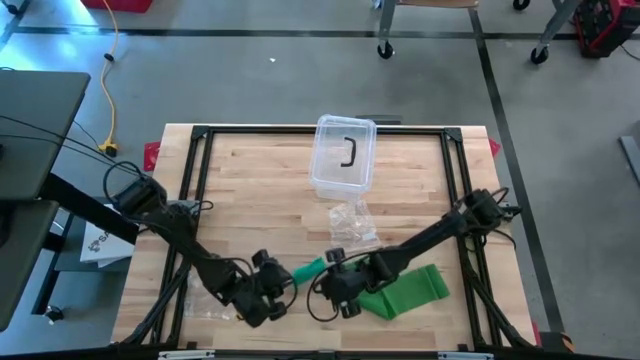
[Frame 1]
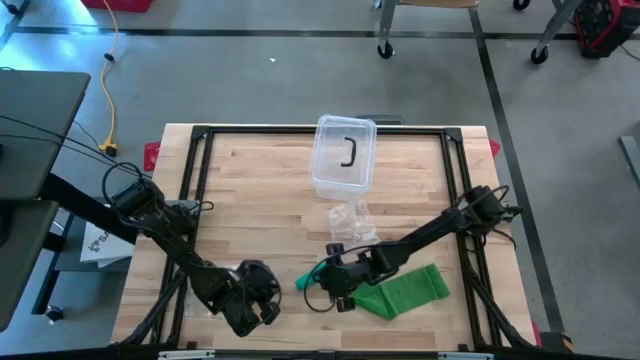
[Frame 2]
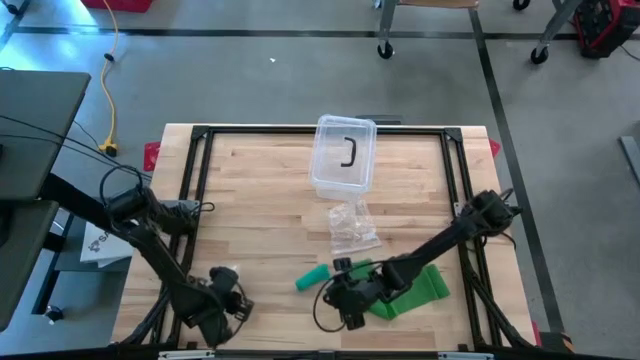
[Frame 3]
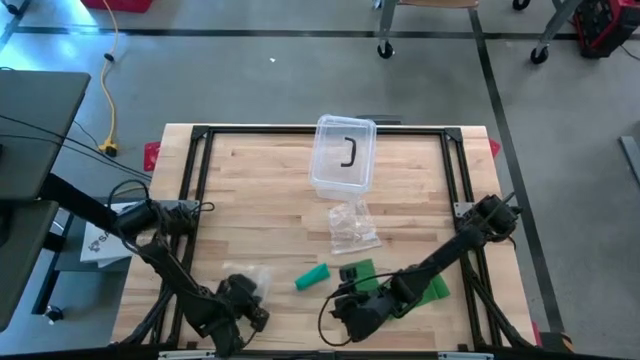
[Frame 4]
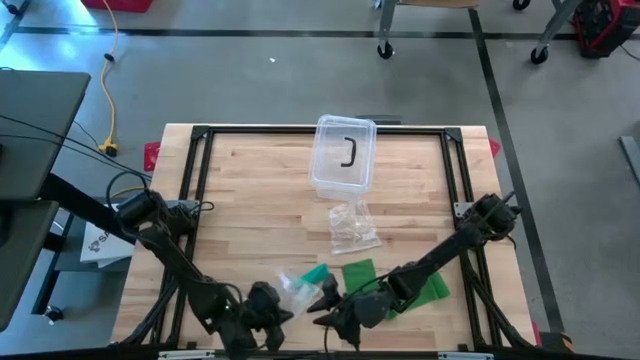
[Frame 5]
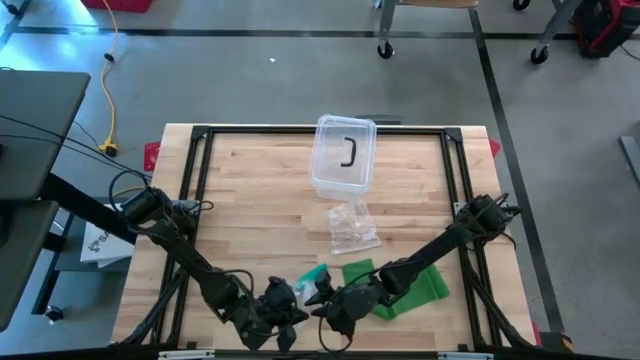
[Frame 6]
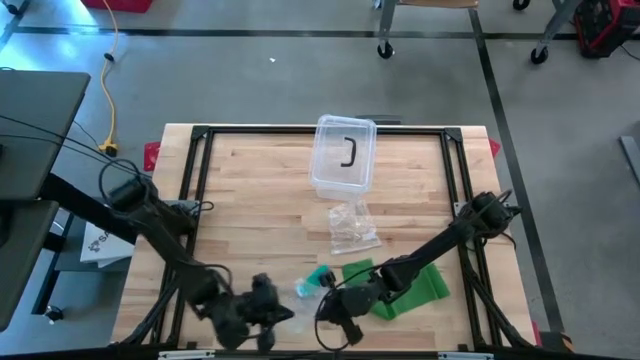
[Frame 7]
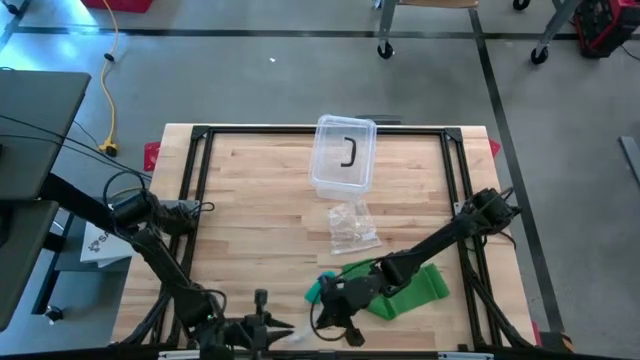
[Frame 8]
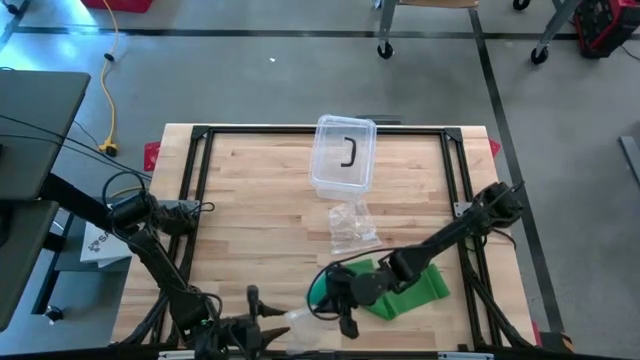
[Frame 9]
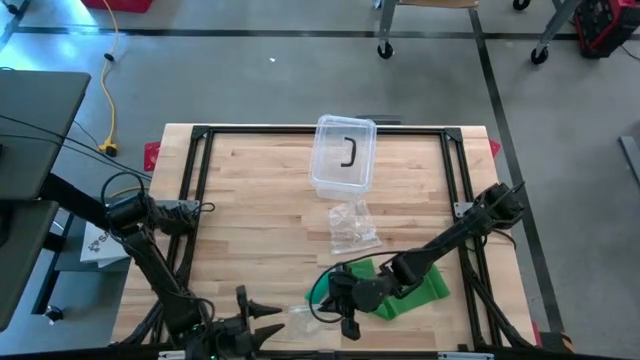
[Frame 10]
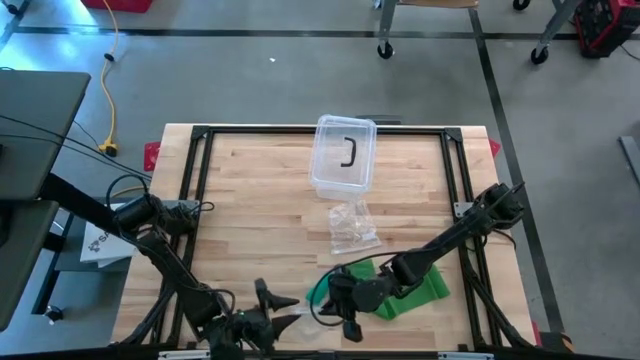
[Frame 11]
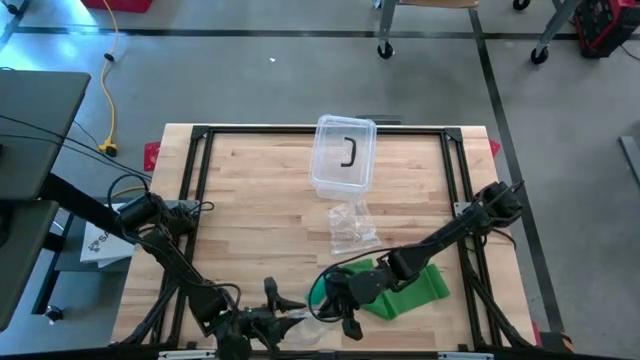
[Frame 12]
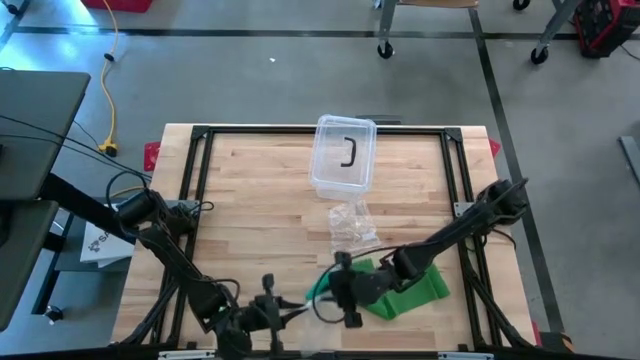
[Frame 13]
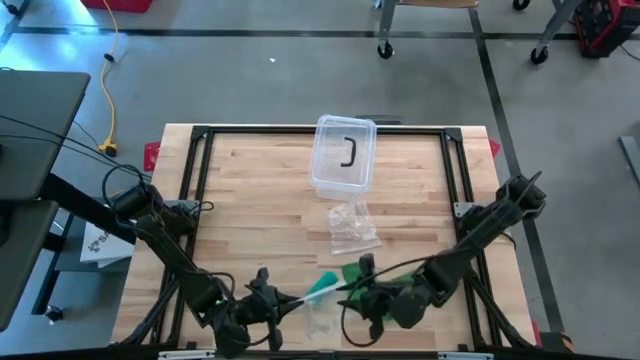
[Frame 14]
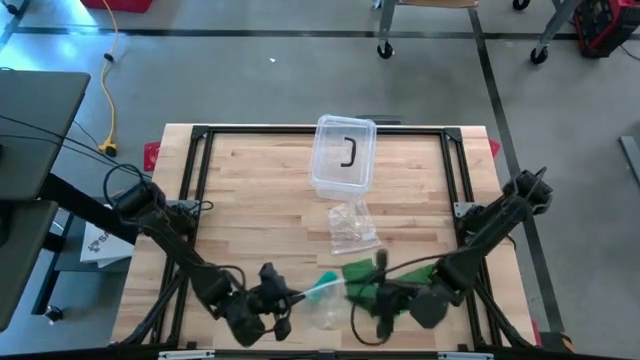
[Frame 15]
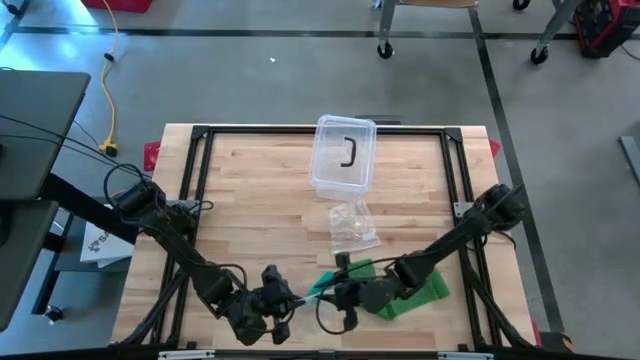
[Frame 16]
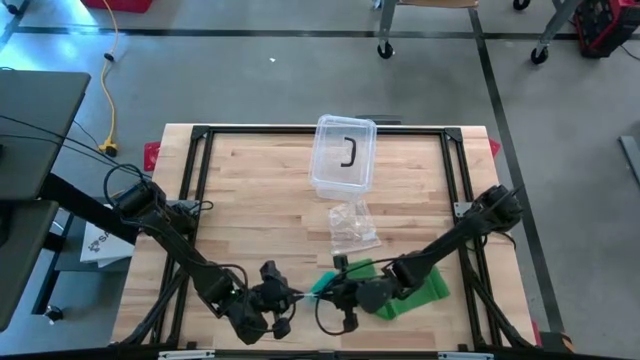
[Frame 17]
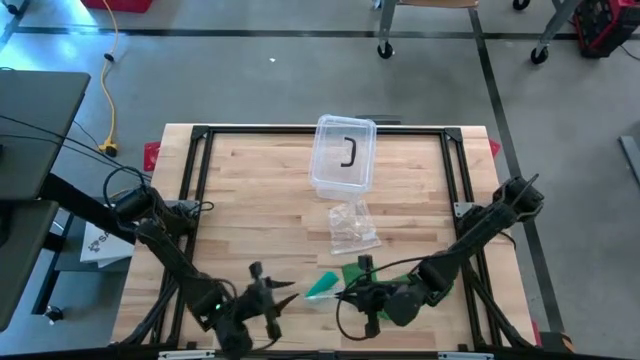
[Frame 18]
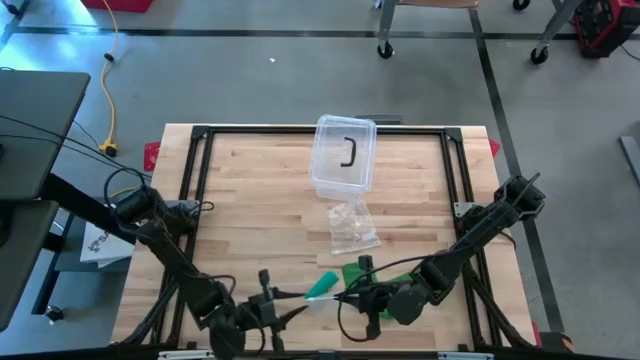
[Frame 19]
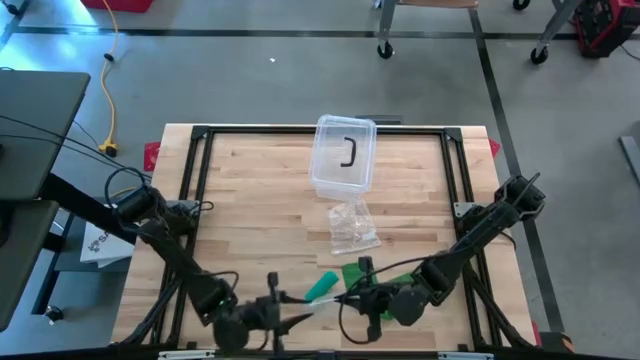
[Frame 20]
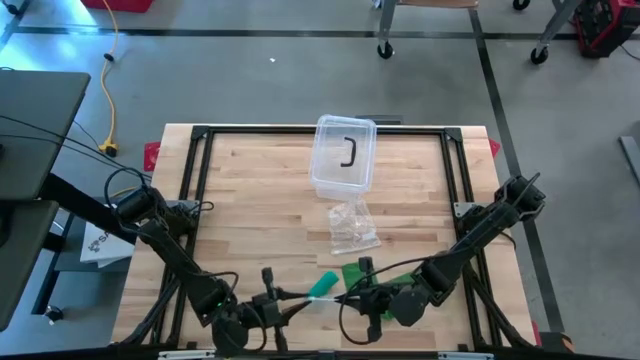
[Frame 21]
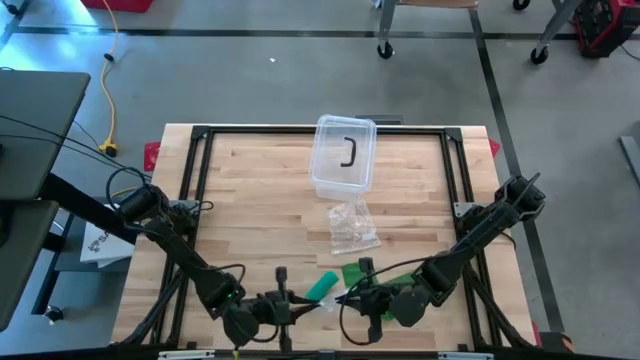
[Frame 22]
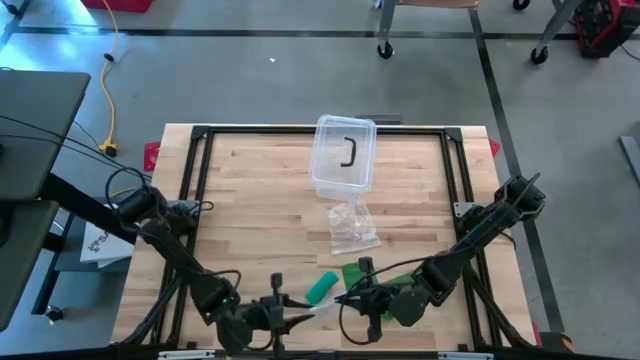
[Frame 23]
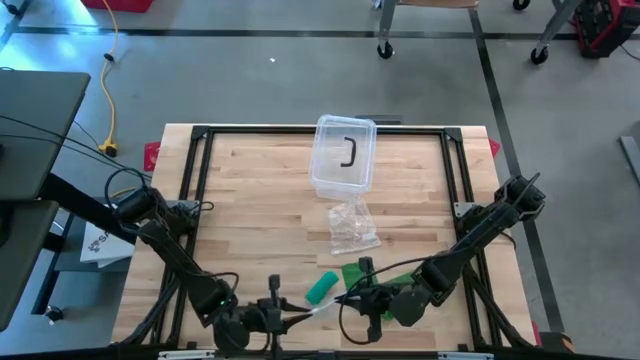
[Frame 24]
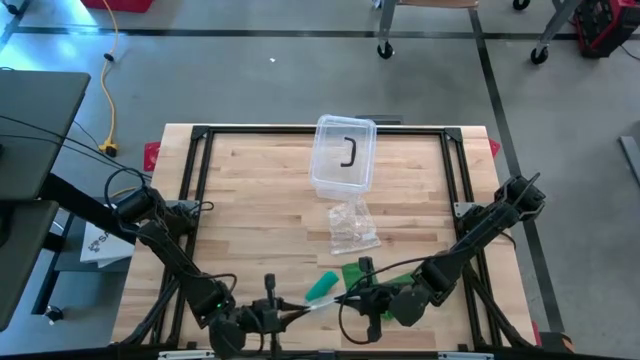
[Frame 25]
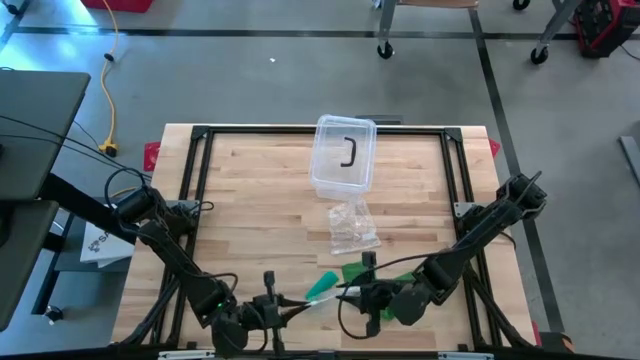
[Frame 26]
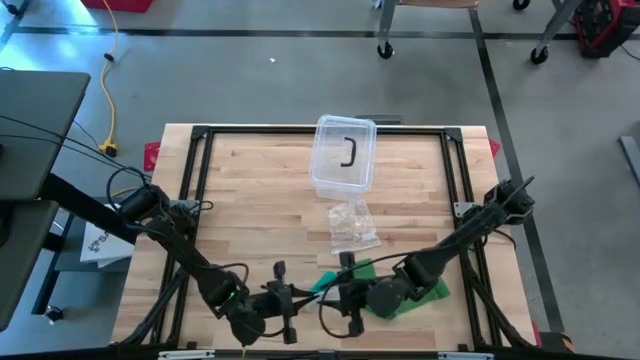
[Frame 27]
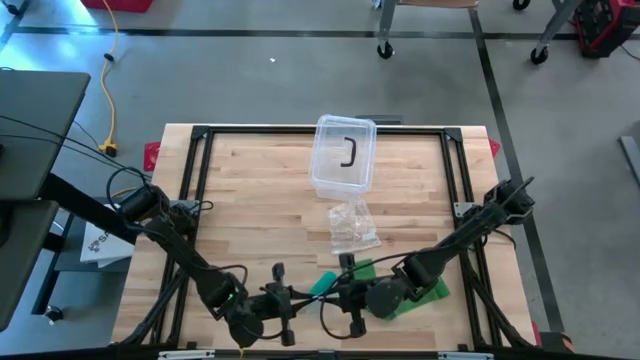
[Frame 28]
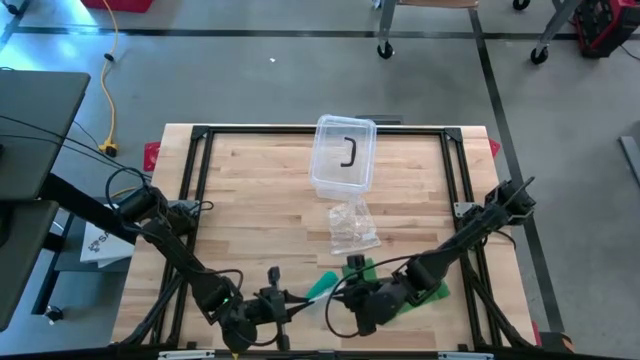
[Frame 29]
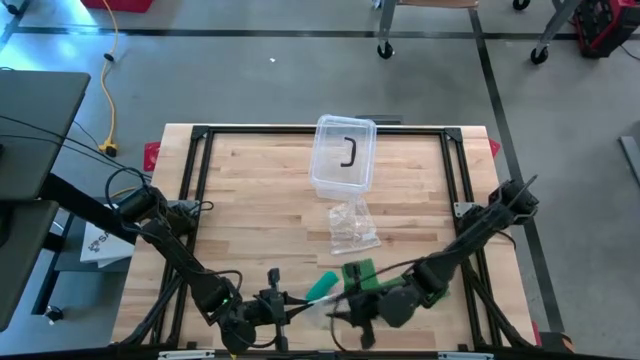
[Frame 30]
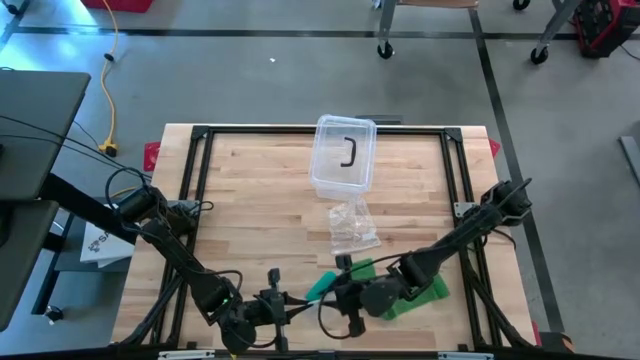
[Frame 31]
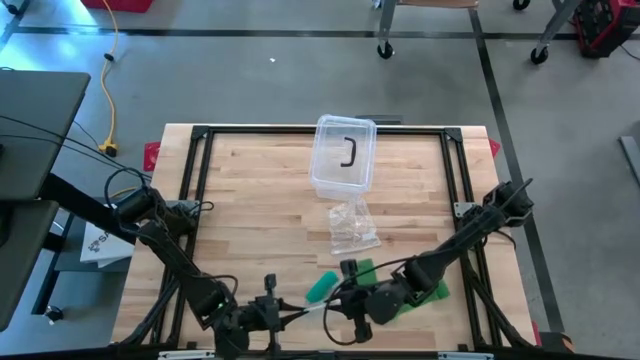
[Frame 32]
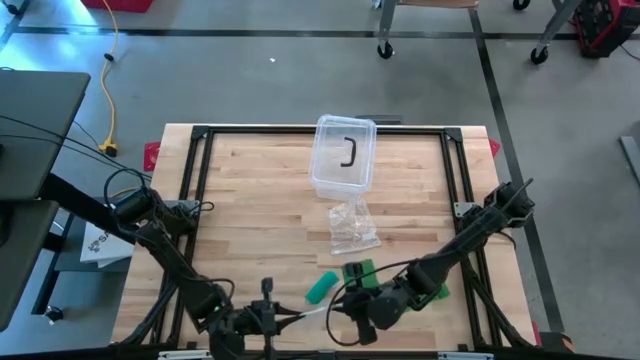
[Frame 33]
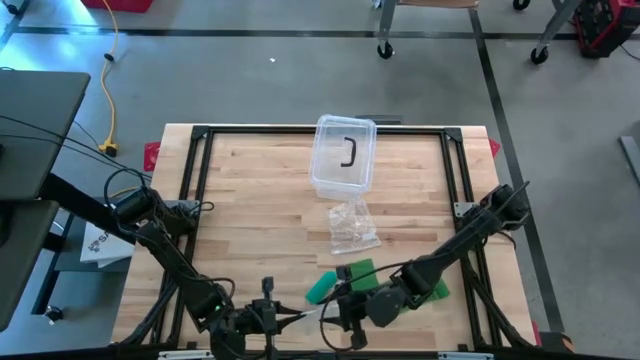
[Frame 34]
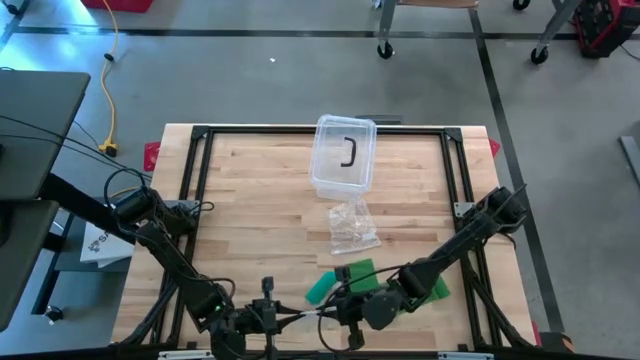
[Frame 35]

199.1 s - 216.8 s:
Task: Roll bandage
Open the transparent zip bag

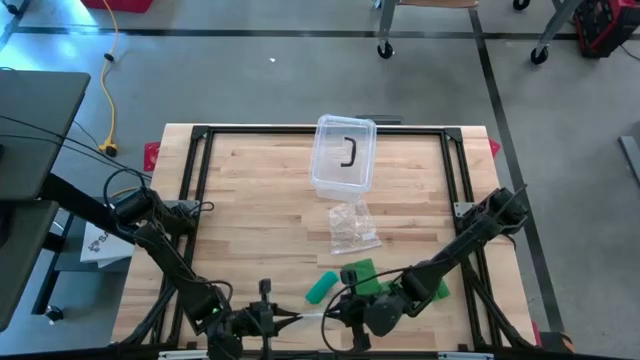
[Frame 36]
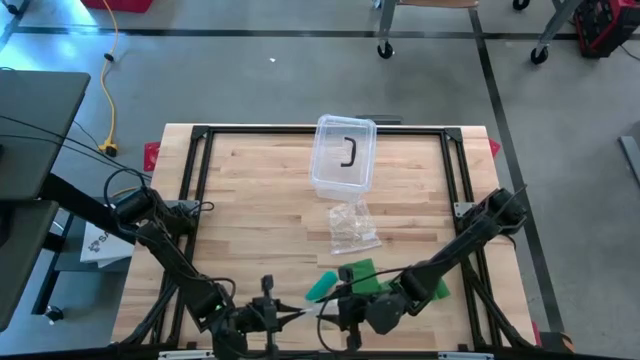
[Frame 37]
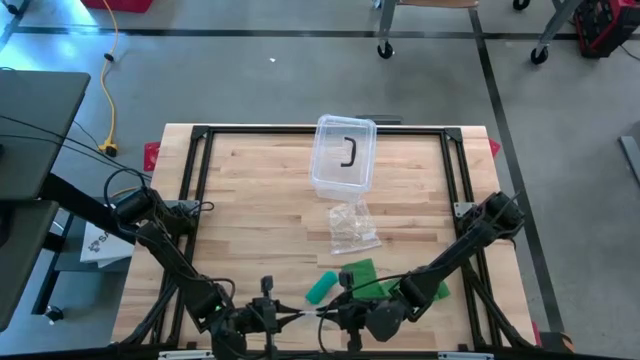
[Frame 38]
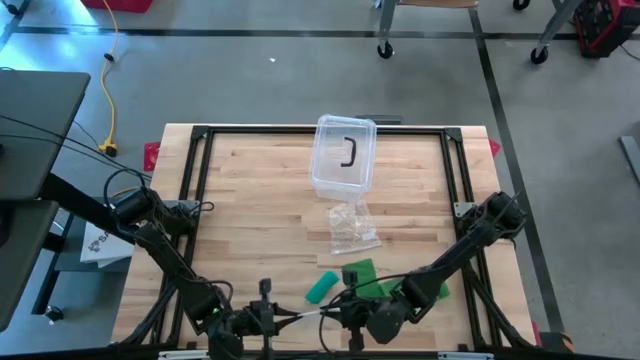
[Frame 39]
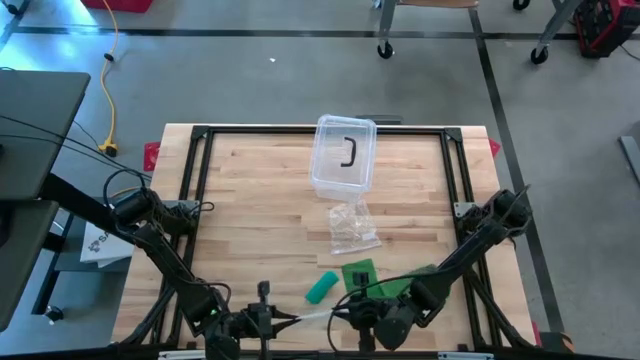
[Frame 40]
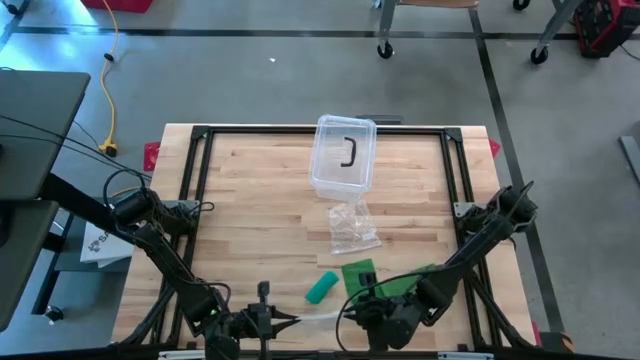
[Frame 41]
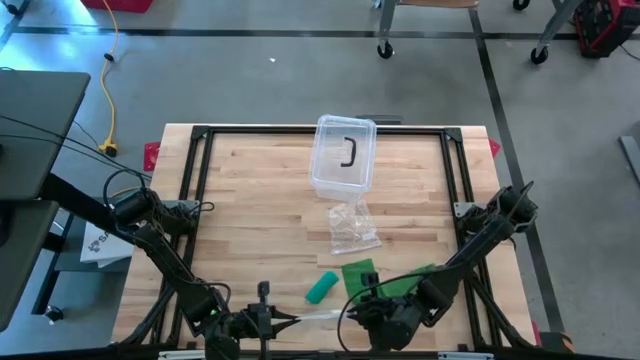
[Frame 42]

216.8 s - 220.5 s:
Open the transparent zip bag
